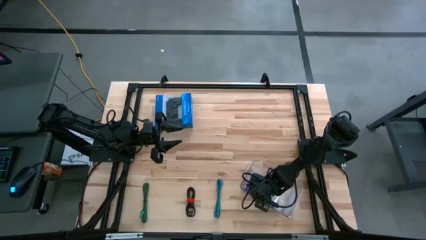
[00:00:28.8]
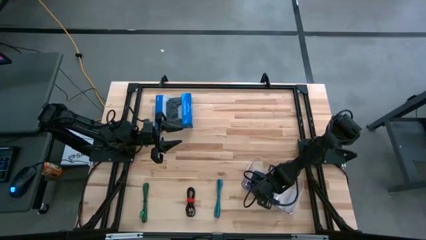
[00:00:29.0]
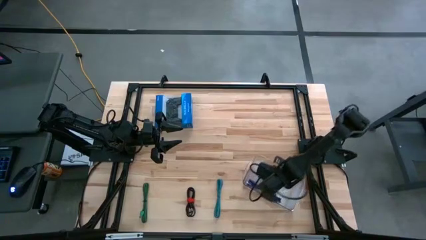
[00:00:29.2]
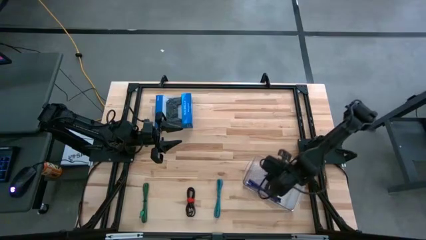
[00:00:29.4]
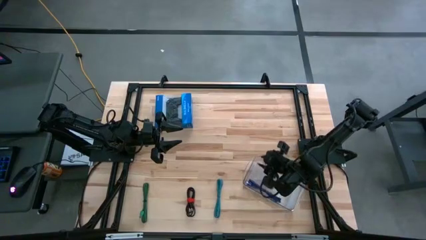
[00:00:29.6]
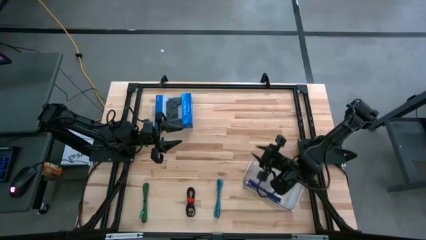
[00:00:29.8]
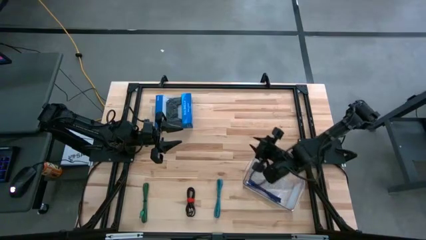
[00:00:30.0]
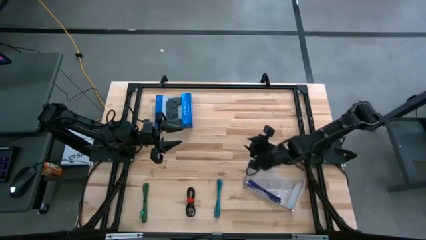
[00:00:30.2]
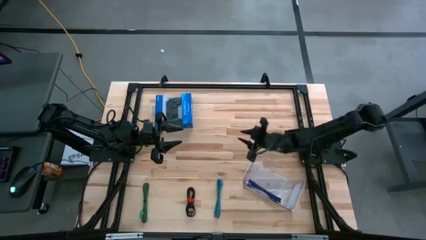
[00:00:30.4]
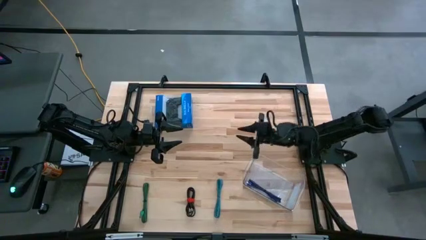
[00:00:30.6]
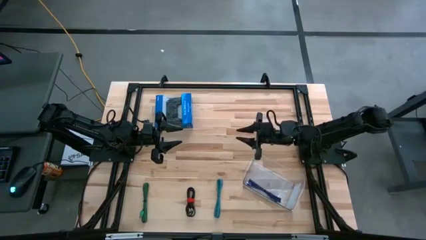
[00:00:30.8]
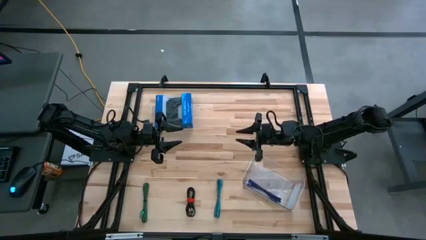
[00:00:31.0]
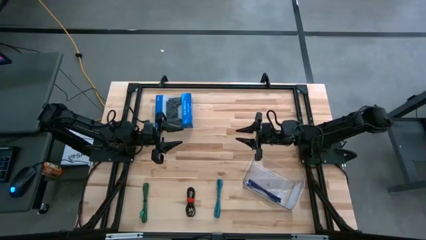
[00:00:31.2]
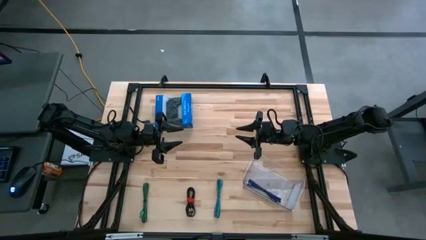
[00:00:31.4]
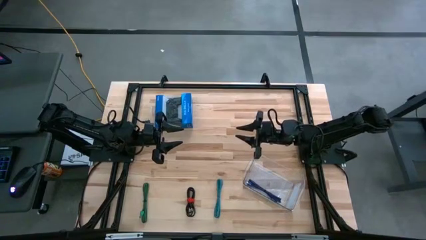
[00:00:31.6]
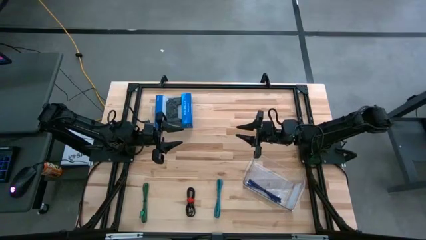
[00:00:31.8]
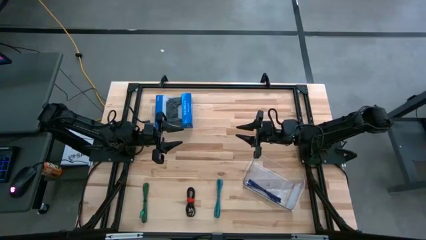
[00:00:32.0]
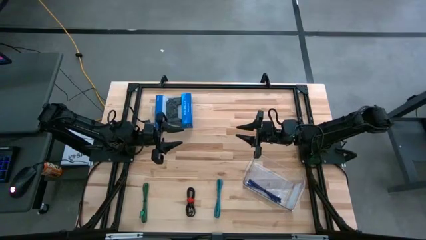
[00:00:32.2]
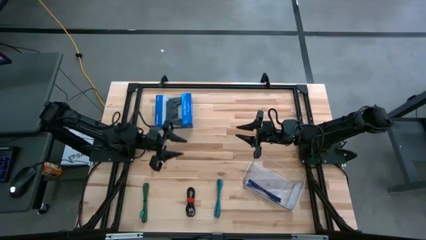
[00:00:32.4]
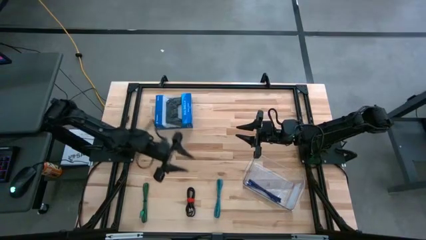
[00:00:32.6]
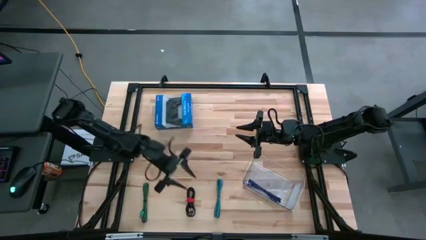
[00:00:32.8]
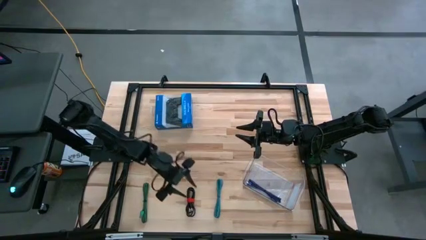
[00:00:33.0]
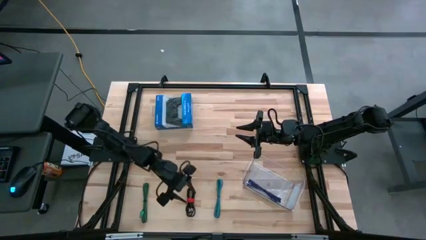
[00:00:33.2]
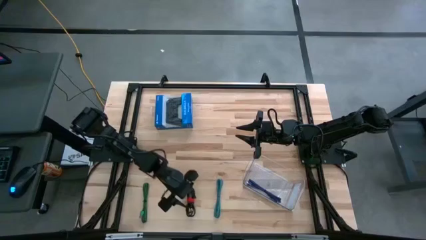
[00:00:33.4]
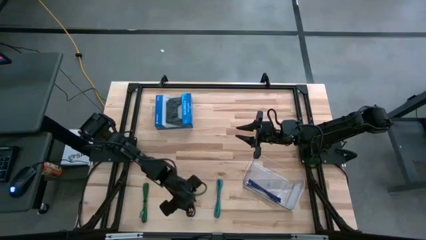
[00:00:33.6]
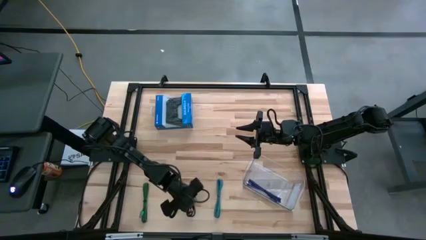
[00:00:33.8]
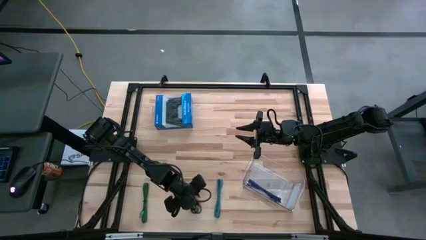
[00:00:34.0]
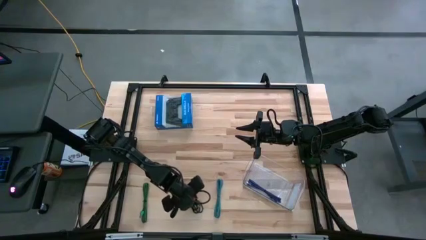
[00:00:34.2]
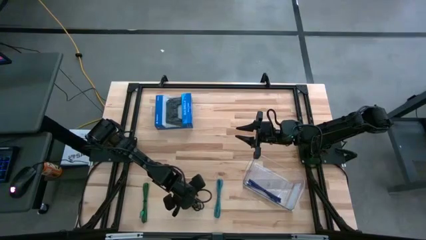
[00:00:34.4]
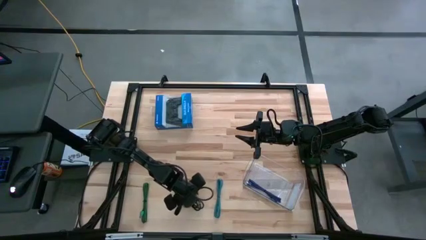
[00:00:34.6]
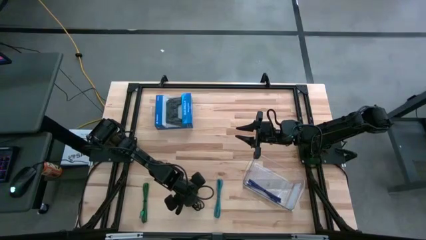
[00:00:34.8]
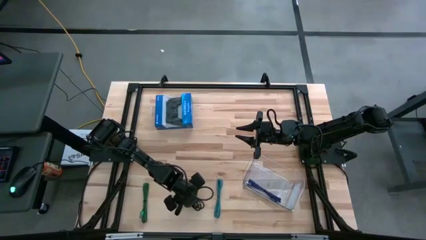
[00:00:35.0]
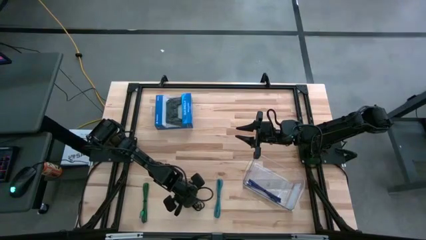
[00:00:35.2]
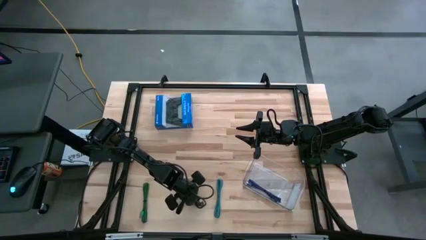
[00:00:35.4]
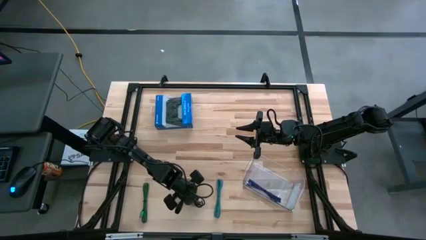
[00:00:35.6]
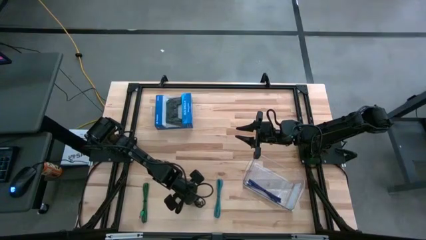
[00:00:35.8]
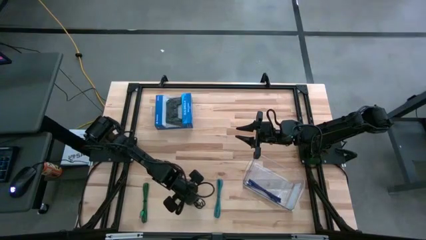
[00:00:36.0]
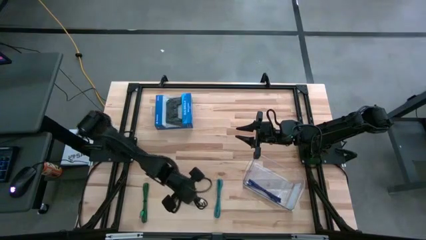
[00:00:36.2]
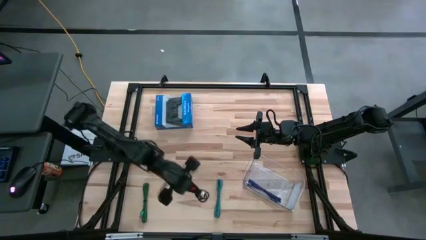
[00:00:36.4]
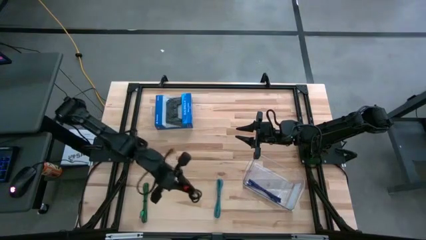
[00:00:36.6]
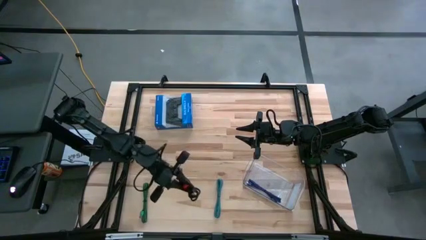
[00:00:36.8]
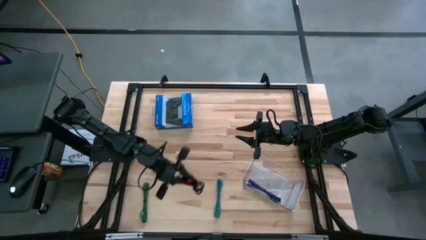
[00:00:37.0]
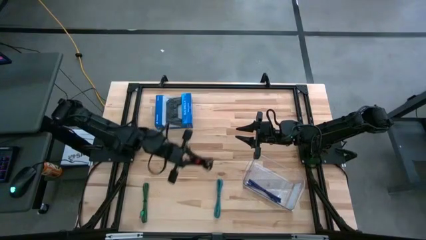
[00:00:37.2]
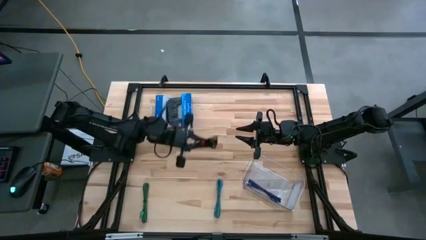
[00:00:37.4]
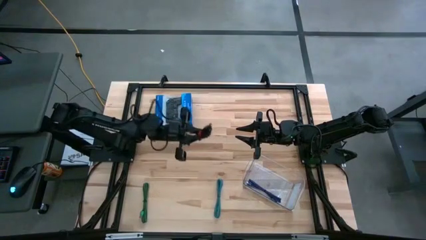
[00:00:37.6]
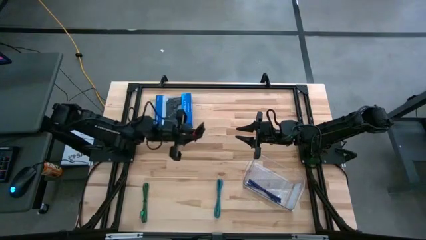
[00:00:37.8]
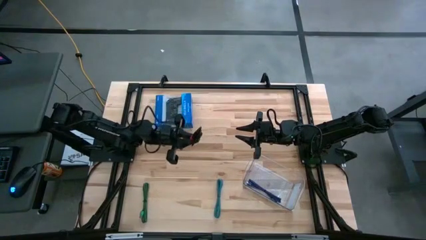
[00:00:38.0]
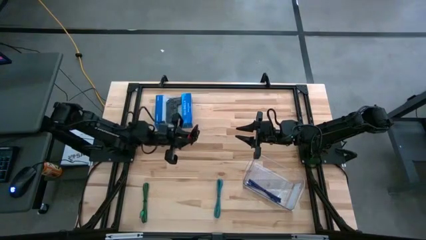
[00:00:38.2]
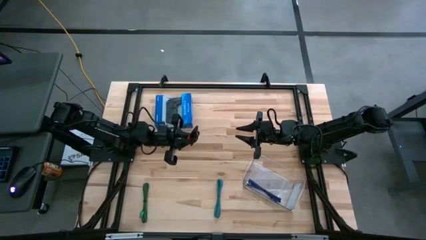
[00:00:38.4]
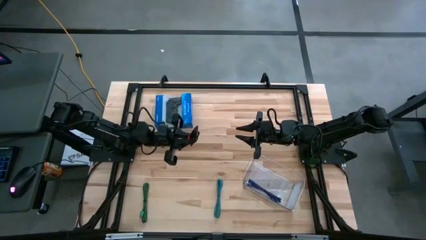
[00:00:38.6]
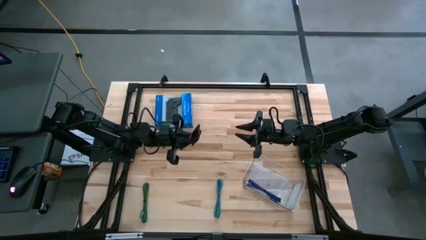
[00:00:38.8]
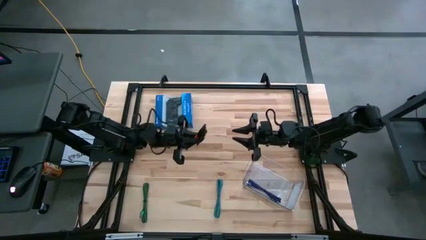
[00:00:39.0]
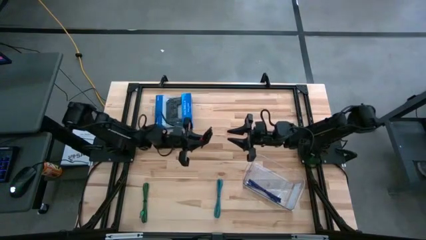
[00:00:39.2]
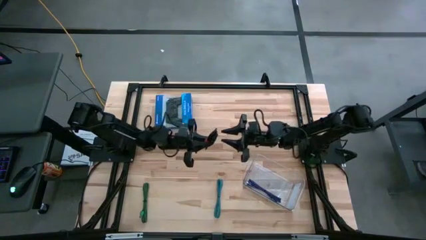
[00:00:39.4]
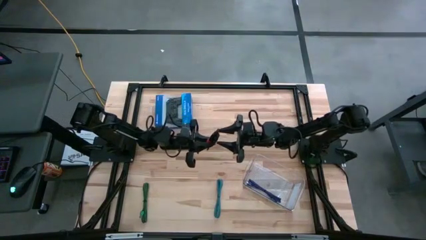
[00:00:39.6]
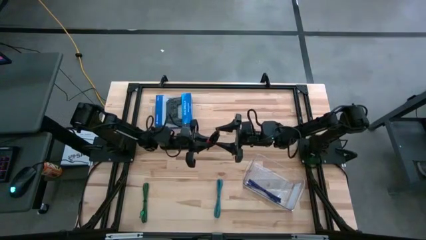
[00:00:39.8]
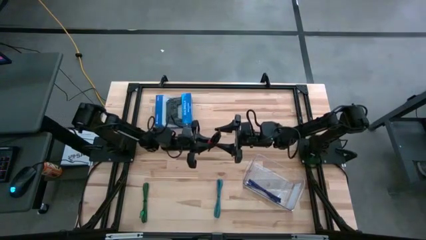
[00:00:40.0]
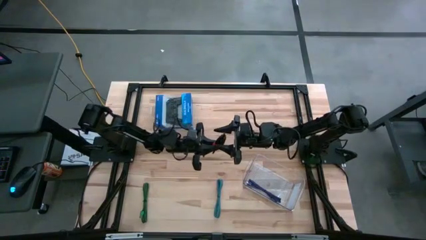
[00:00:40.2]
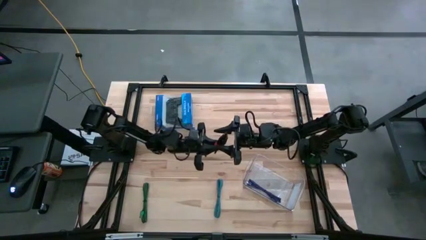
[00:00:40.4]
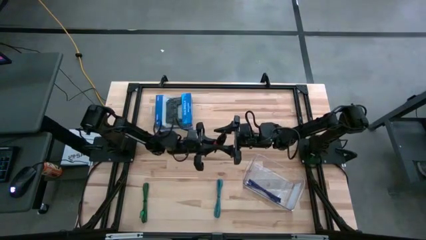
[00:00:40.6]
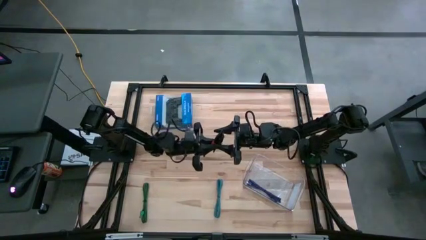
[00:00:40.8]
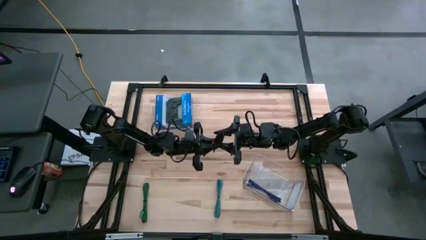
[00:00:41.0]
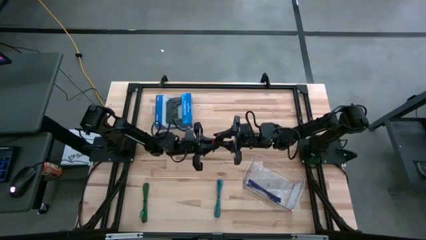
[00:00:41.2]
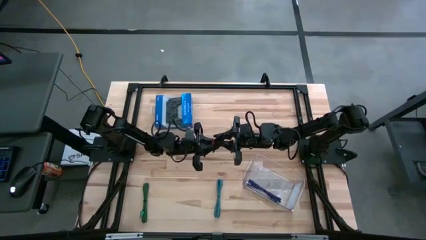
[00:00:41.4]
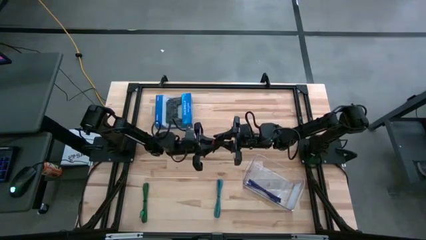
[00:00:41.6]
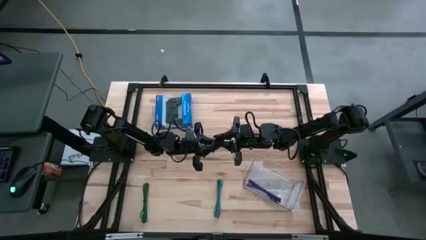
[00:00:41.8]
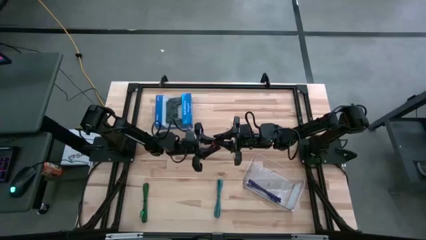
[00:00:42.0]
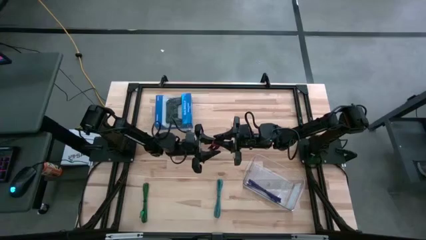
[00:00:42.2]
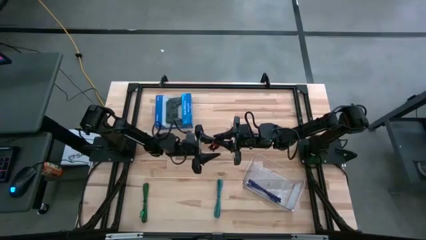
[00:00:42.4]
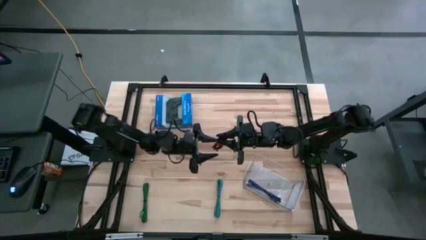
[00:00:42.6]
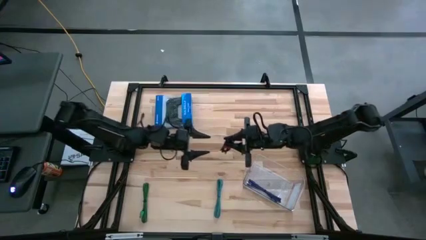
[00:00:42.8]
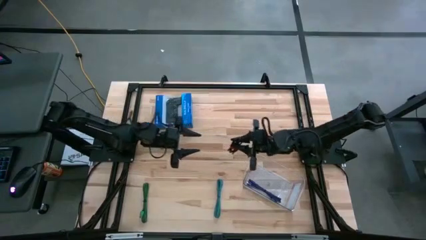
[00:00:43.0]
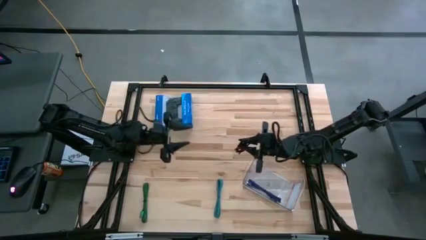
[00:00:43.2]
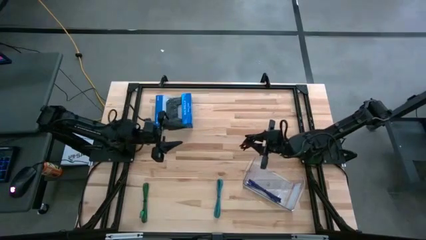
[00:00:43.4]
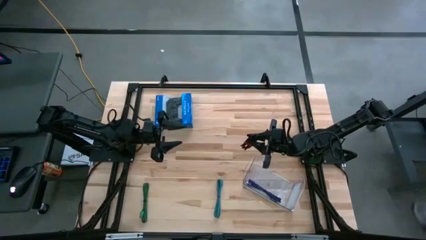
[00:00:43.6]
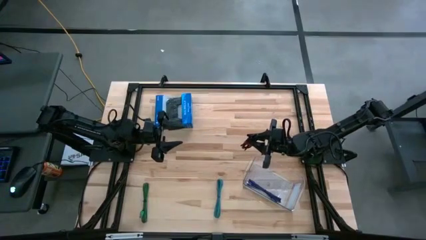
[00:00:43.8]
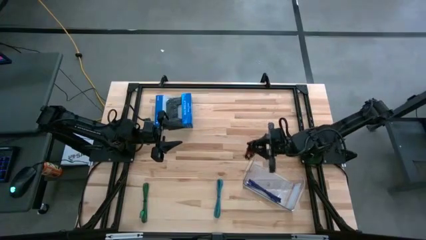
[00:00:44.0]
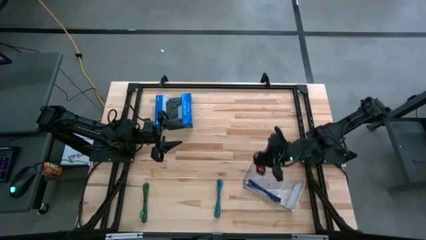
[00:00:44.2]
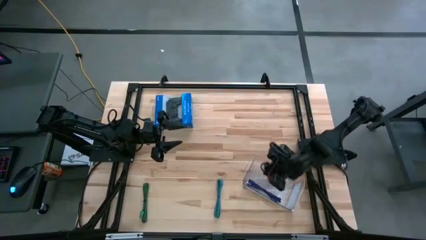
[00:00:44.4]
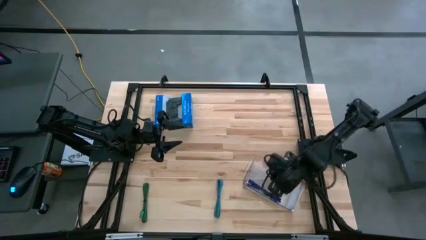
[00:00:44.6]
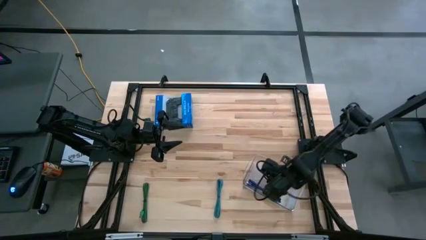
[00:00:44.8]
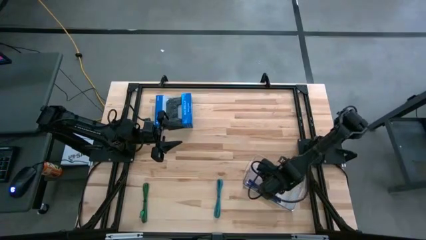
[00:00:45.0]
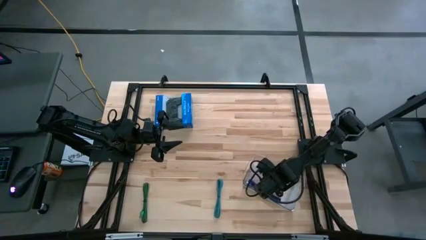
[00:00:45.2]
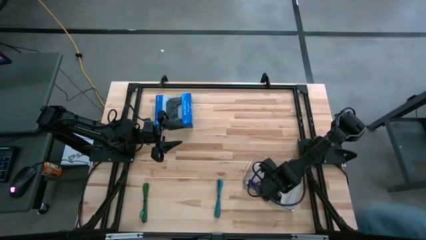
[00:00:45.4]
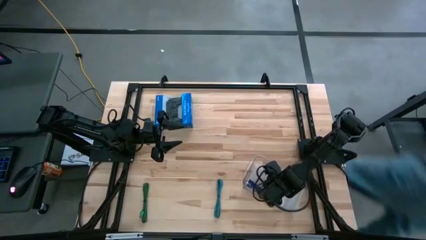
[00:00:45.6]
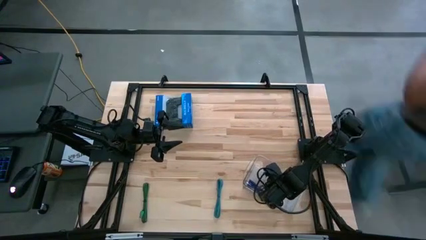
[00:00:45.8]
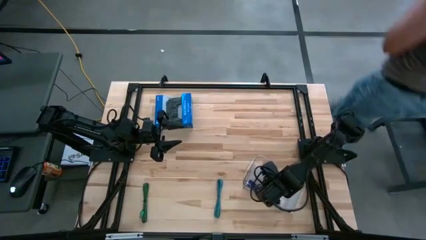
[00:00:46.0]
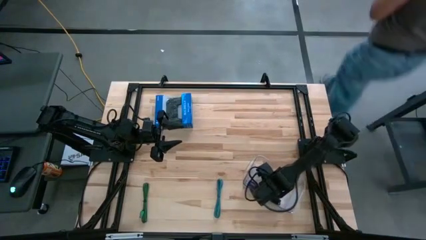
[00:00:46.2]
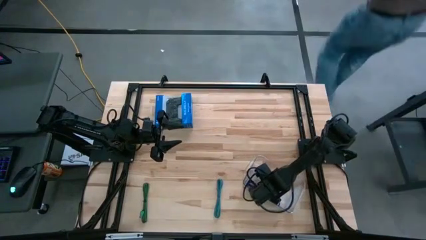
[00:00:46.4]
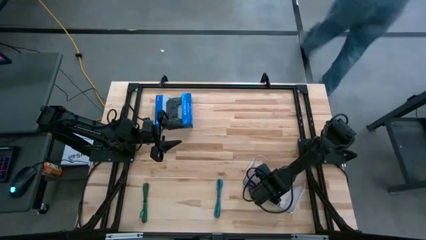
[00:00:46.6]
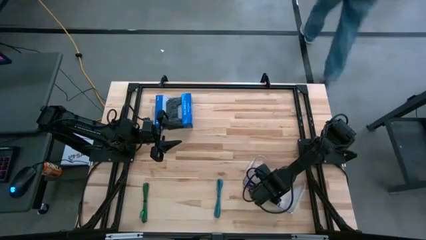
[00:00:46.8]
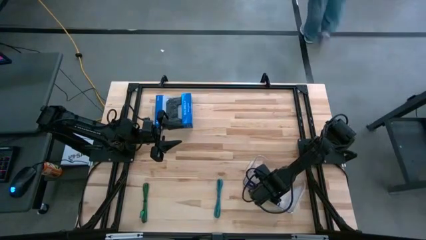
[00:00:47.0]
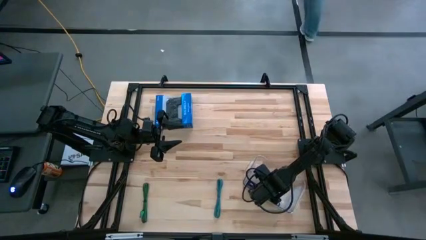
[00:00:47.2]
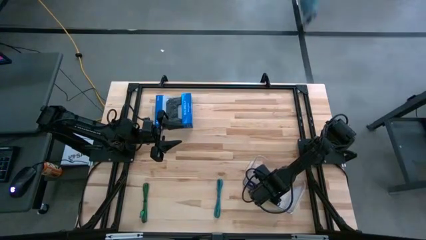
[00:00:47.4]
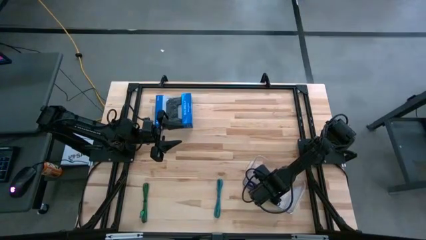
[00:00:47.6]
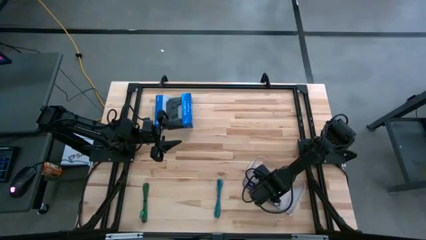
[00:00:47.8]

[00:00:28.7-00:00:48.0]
Task: Pick and place USB-C Cables
Put the black usb cable into the transparent bin
